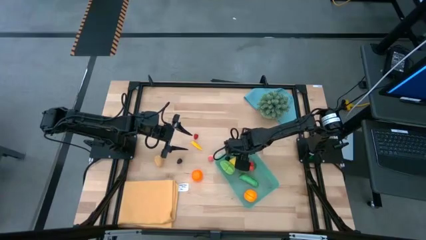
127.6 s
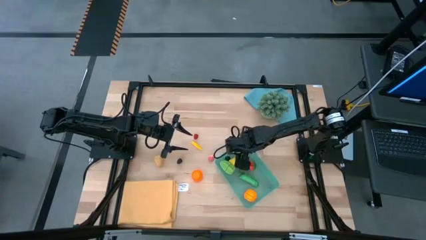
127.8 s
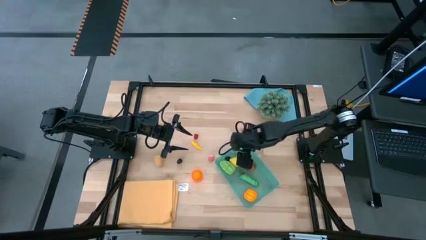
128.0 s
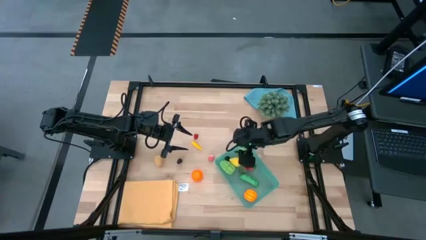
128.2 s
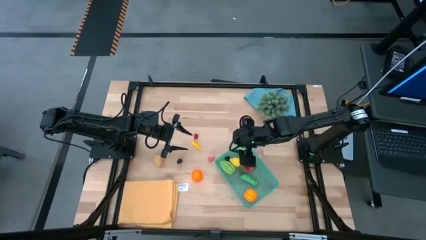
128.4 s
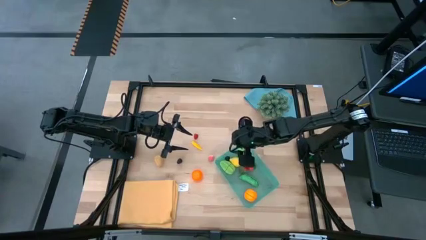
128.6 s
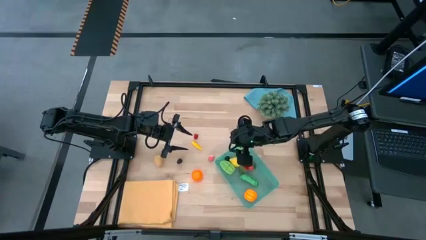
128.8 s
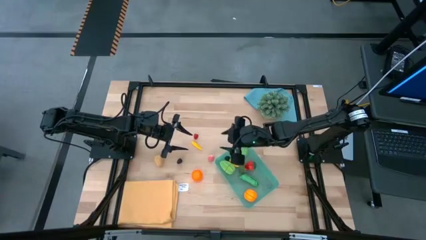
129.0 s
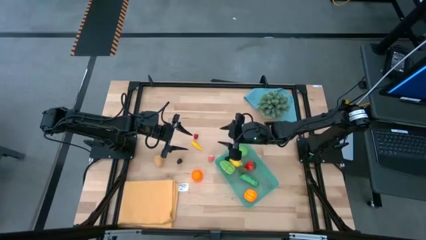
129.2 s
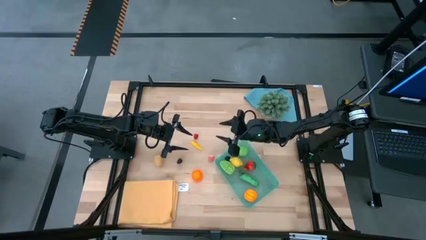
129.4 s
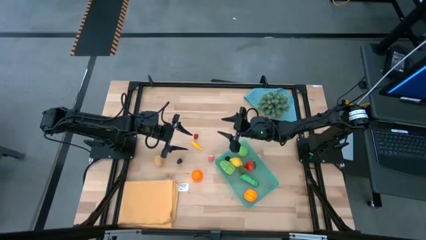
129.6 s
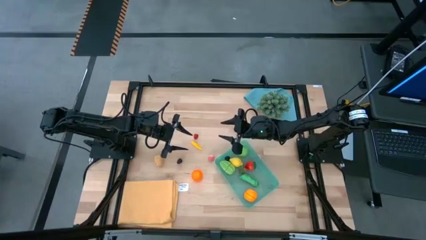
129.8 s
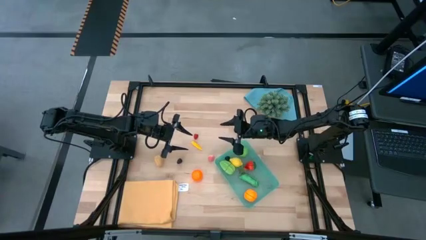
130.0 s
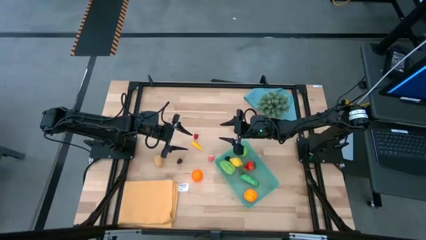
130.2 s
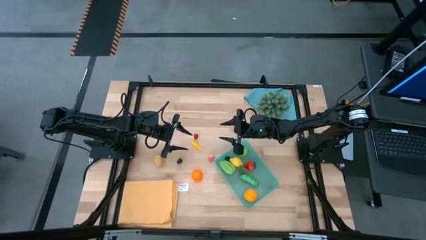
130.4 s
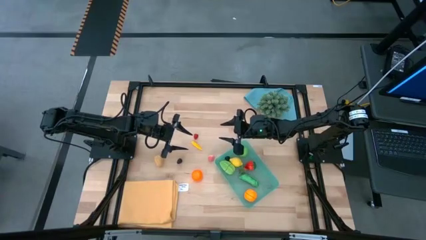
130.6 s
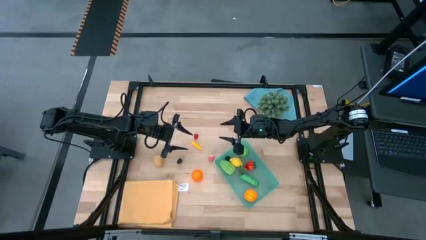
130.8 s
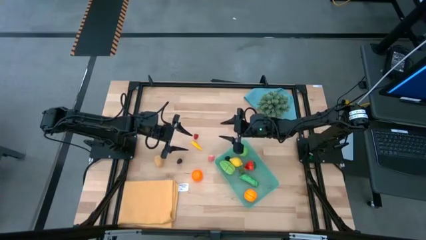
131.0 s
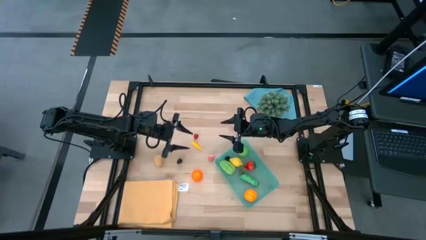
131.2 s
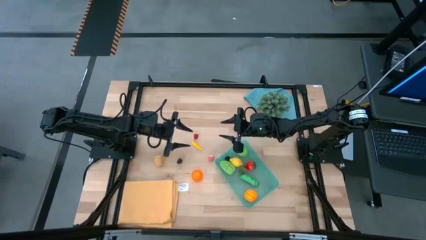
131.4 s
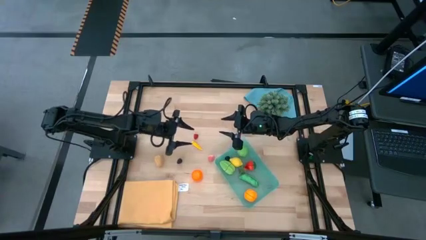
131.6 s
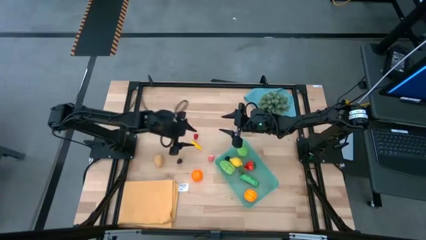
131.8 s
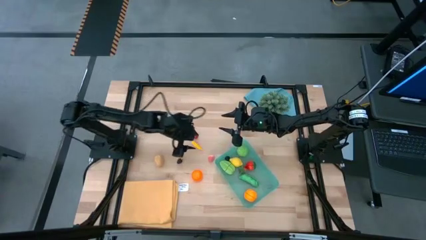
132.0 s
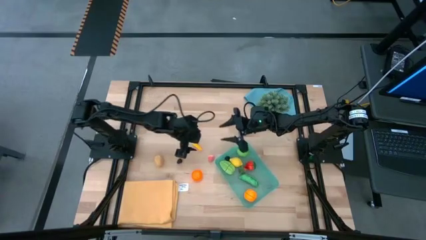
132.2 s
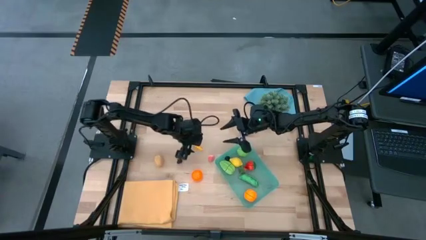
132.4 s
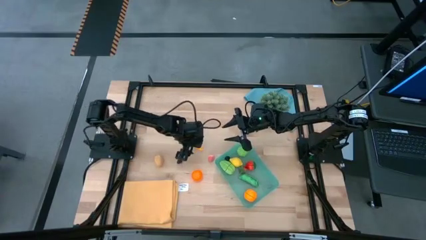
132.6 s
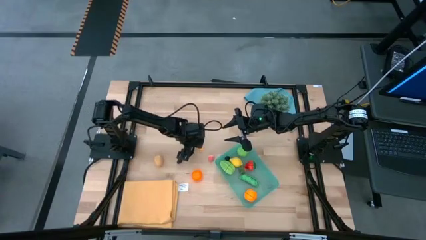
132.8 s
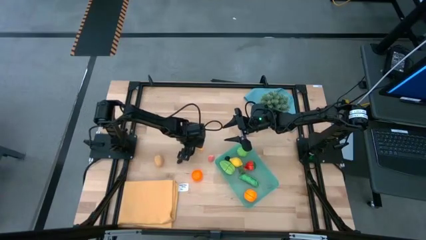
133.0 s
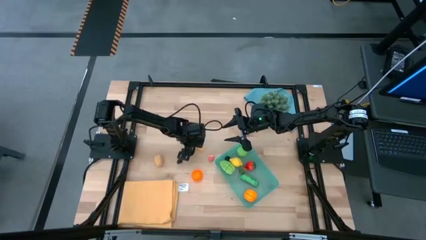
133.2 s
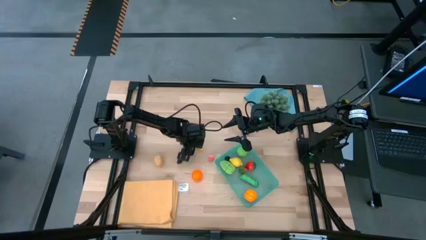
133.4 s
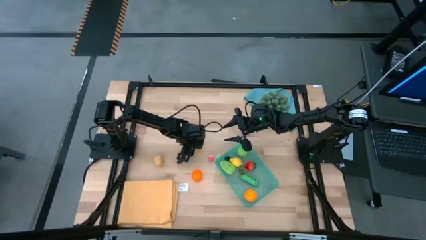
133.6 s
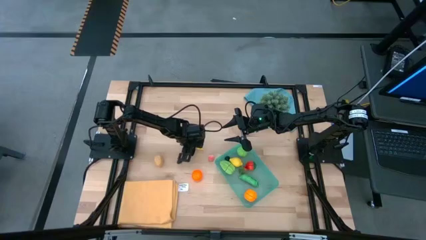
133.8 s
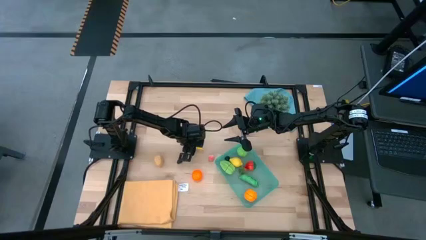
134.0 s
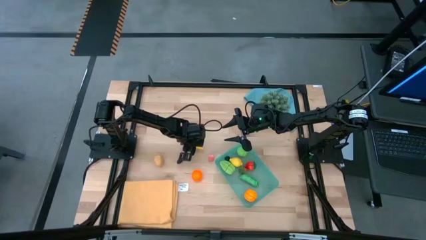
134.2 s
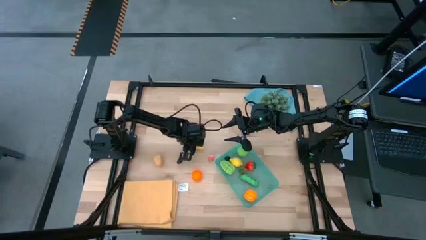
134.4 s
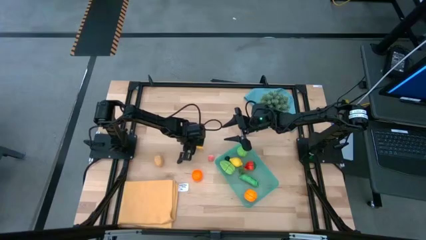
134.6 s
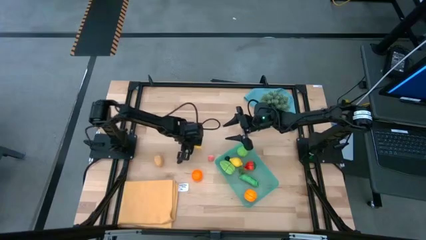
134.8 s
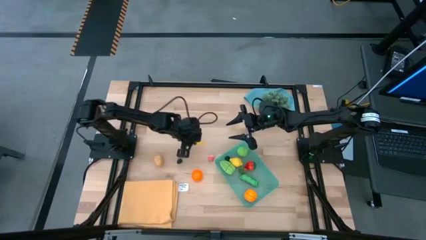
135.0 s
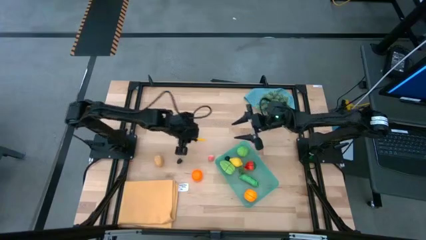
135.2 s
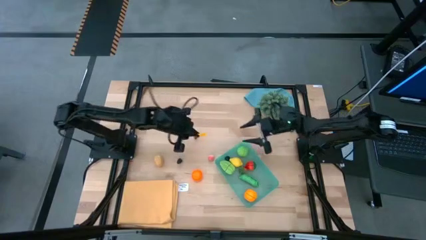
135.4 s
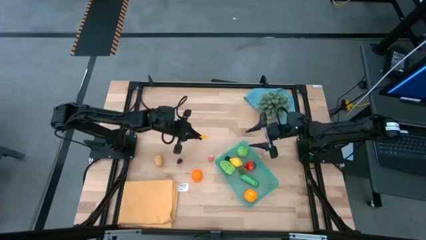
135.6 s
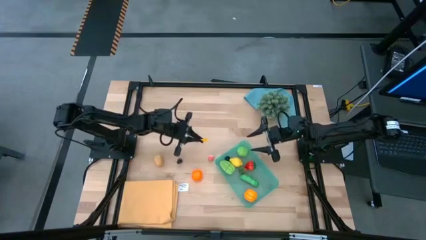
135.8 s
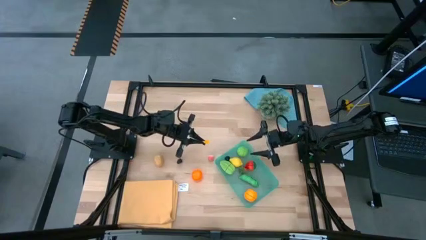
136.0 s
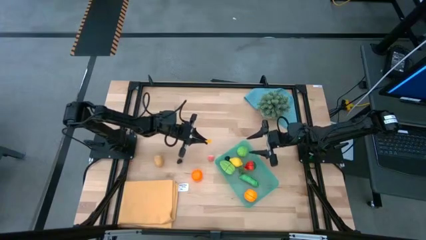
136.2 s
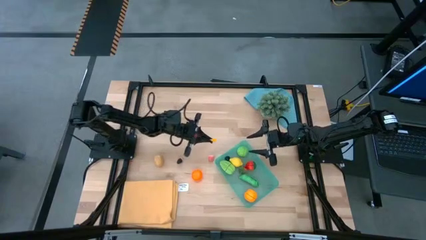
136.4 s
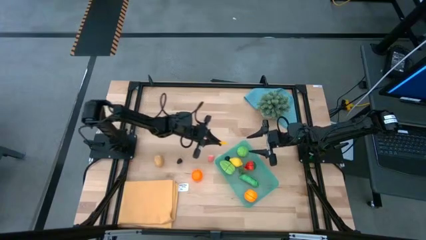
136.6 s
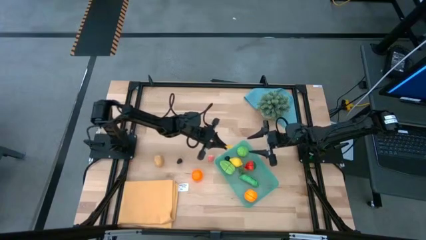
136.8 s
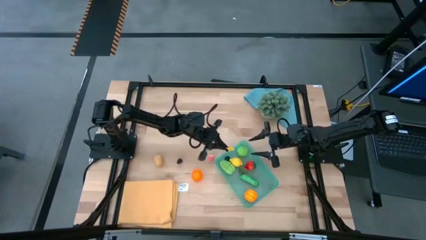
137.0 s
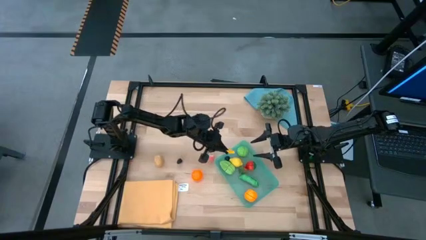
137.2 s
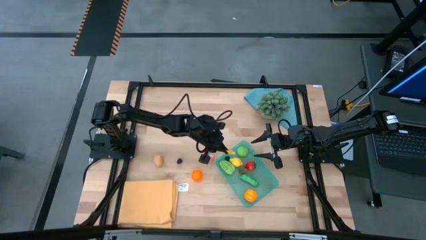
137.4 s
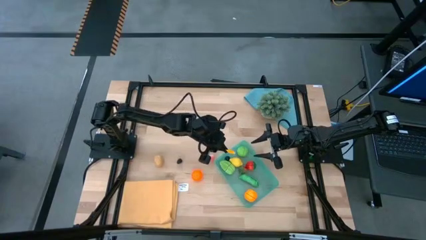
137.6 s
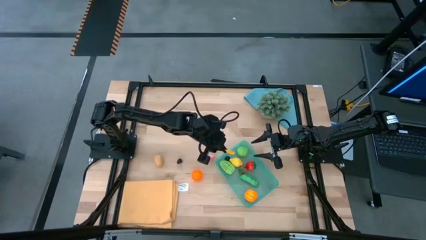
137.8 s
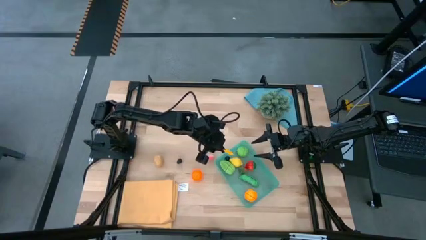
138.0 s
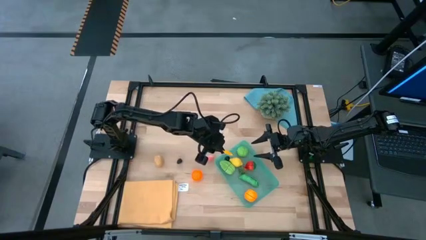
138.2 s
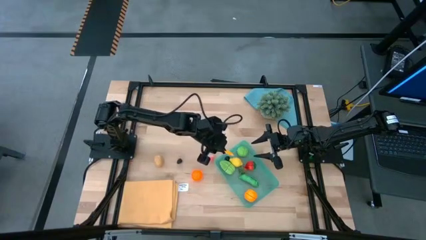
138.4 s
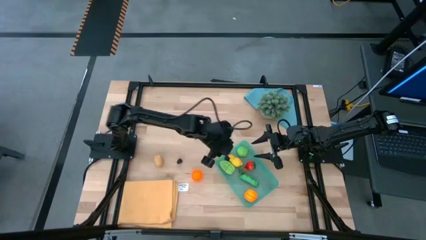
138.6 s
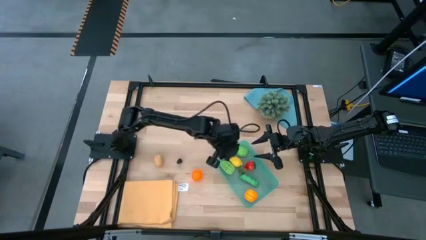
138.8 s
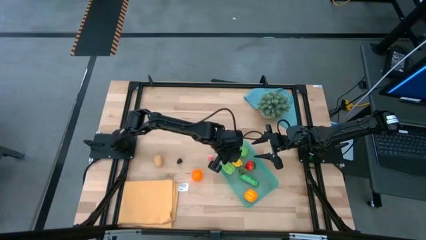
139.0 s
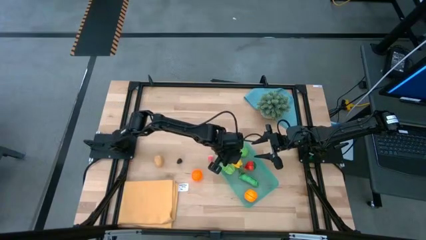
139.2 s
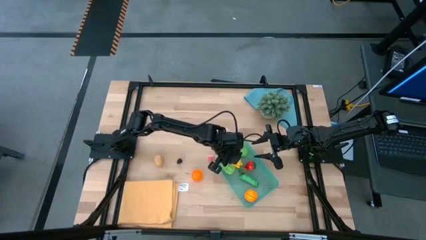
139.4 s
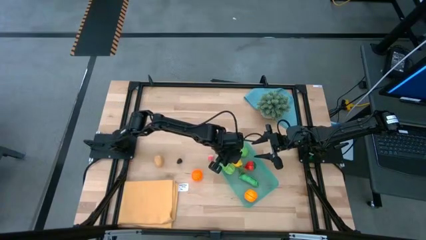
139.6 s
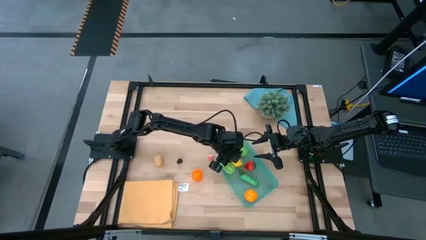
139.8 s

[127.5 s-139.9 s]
Task: Pick and placing Produce into tupperware
Put the corn into the green bin

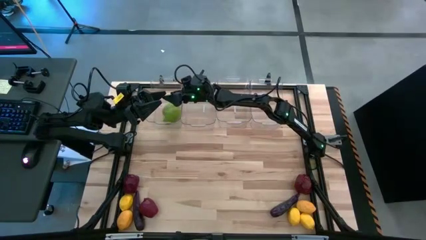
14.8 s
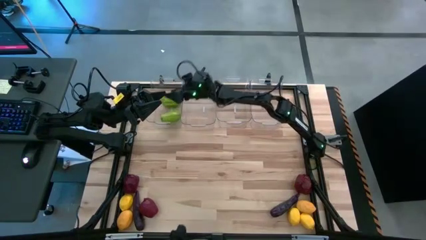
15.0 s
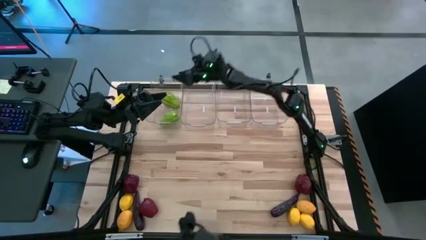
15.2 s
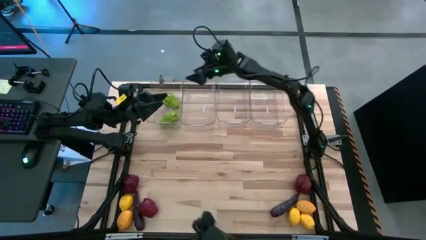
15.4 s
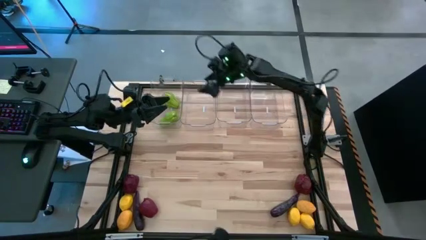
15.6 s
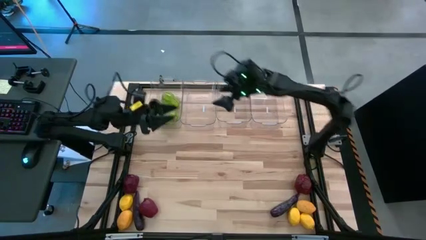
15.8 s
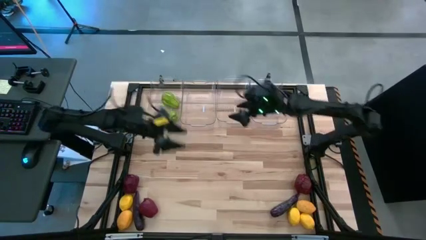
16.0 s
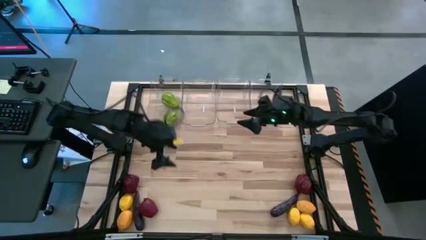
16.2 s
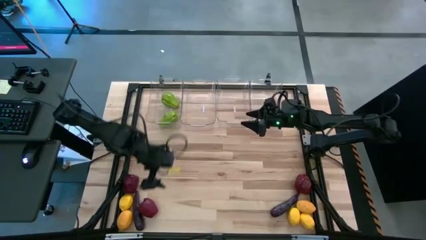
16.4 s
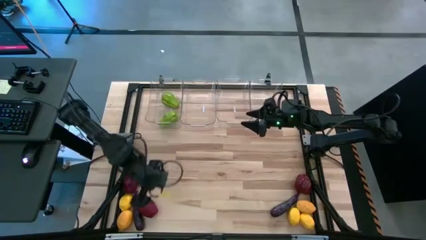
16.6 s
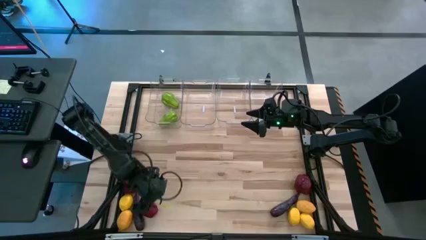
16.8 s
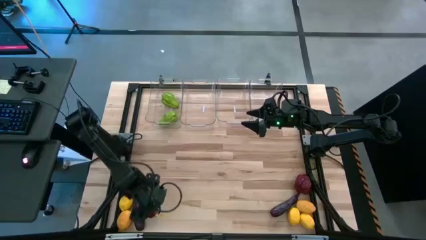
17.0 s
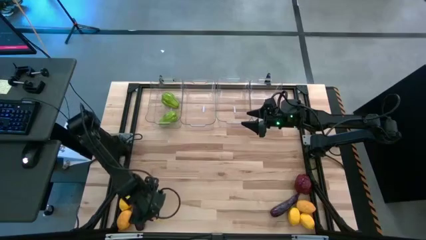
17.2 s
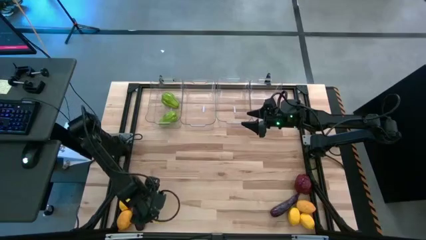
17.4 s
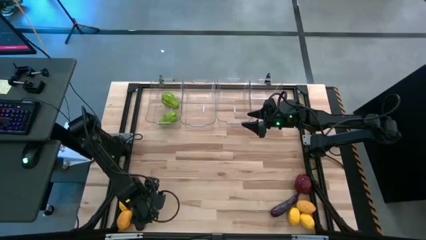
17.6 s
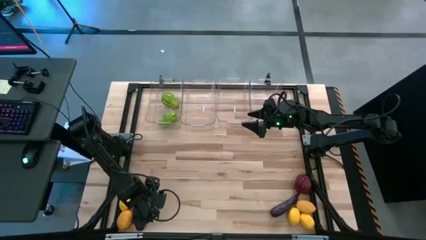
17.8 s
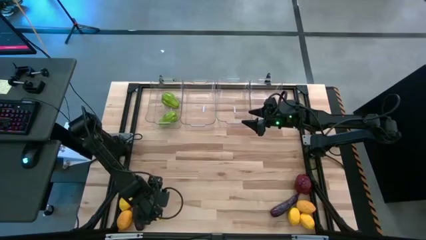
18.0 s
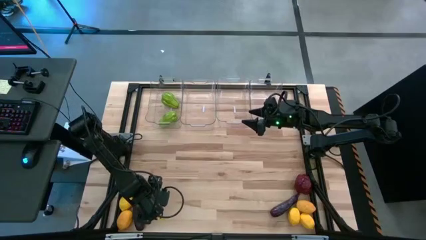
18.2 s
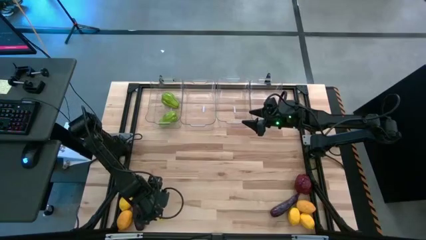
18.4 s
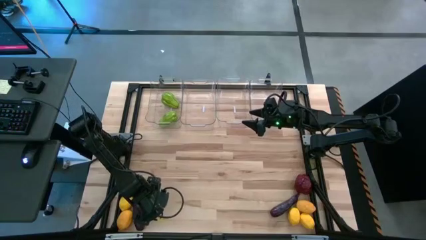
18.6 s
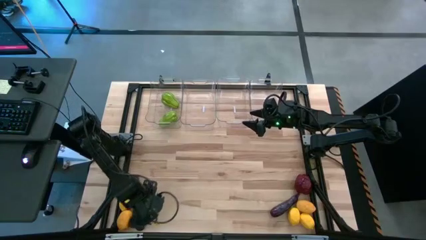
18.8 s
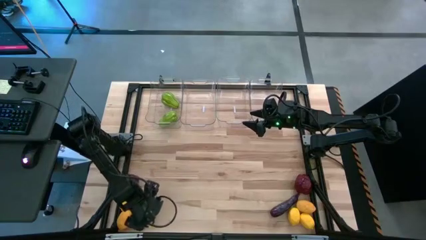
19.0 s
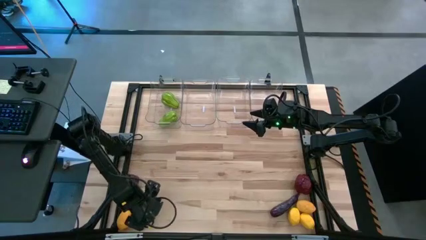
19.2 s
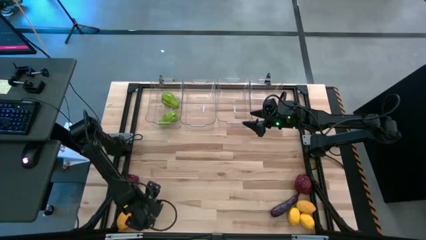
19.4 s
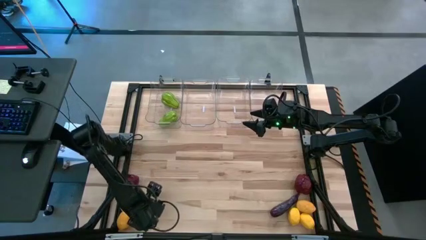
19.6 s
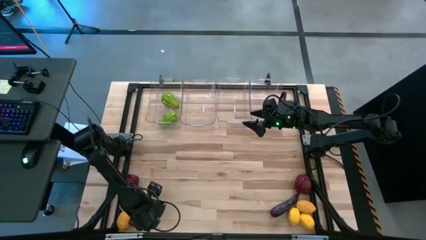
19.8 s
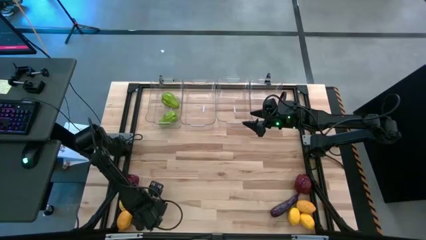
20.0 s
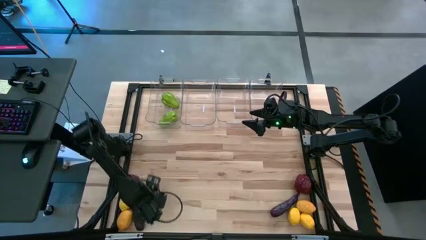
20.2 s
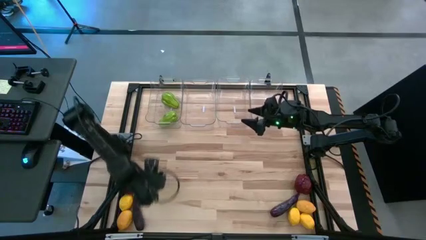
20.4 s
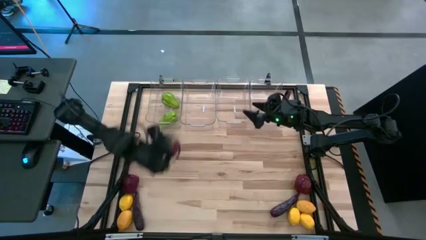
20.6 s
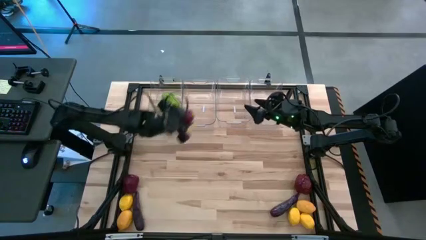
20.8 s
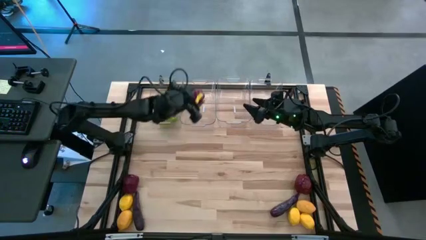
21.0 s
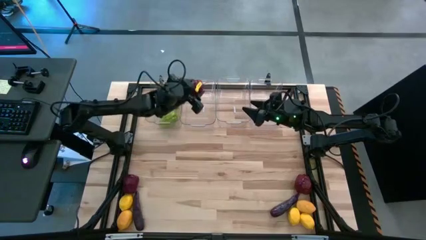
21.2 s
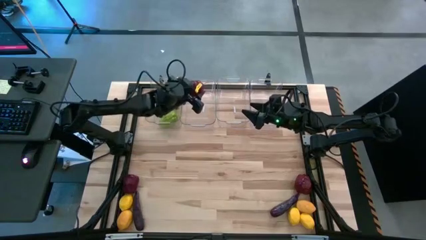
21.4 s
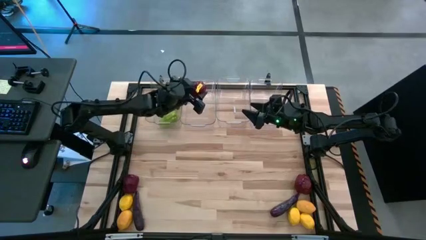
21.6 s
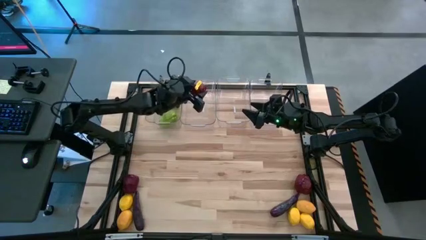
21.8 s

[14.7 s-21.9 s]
Task: Sort produce into baskets
Put the apple into the middle left transparent bin
